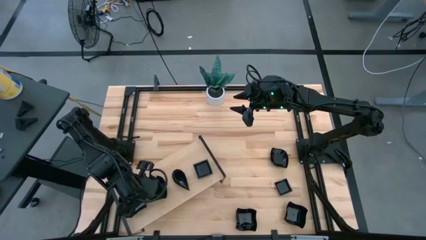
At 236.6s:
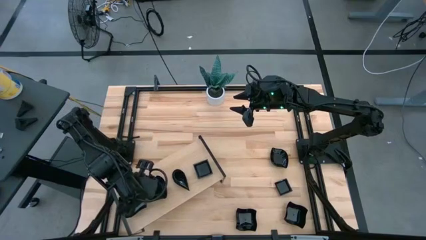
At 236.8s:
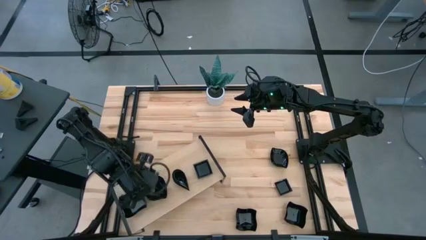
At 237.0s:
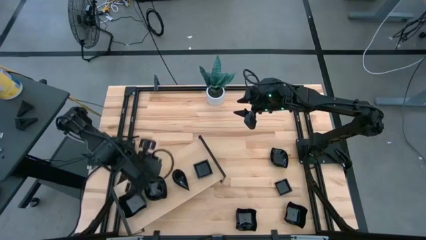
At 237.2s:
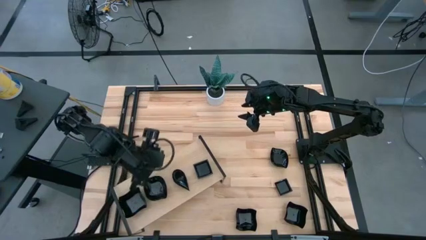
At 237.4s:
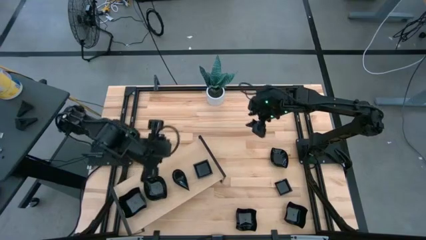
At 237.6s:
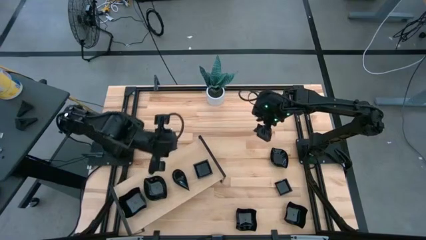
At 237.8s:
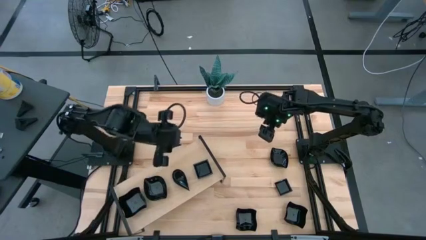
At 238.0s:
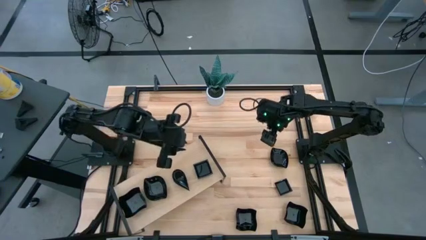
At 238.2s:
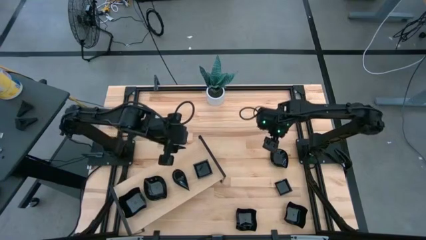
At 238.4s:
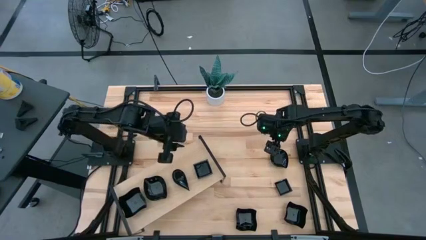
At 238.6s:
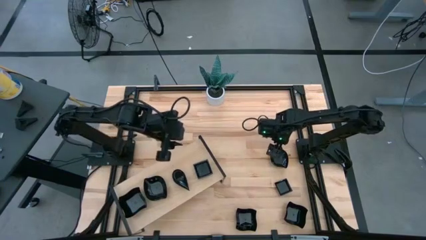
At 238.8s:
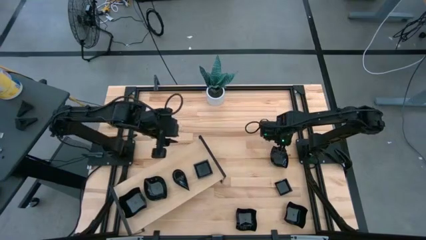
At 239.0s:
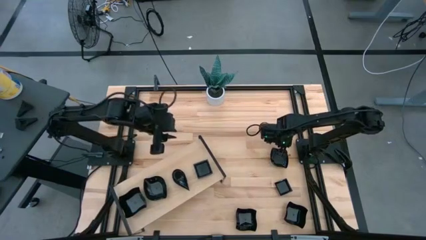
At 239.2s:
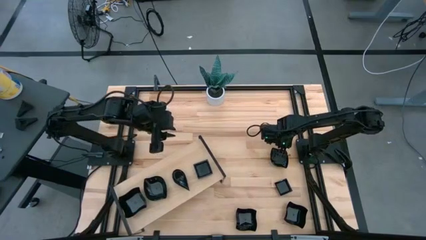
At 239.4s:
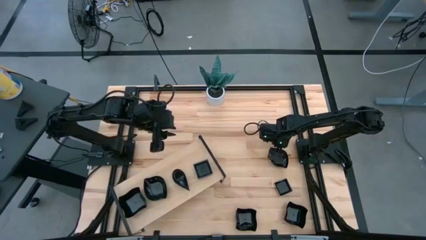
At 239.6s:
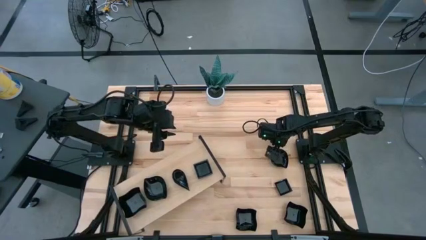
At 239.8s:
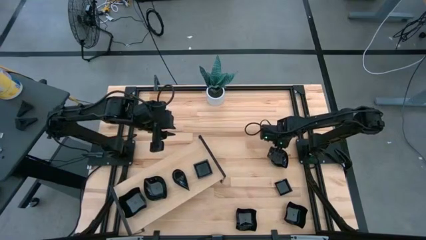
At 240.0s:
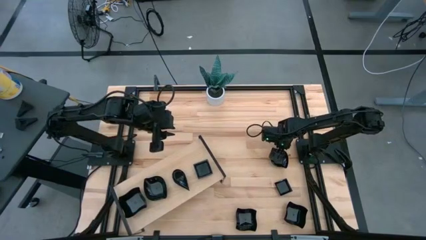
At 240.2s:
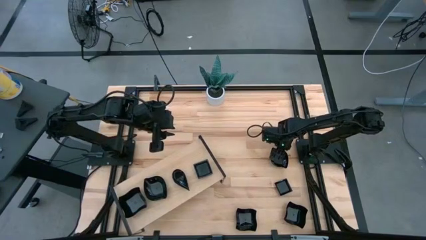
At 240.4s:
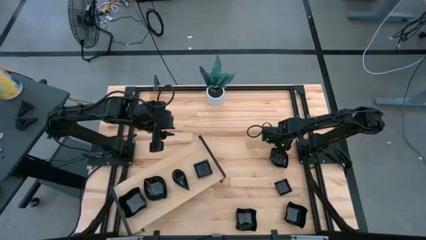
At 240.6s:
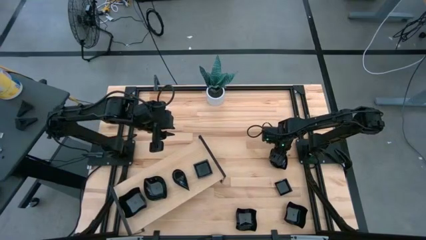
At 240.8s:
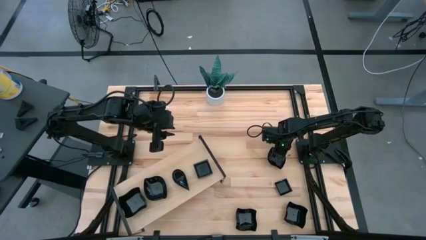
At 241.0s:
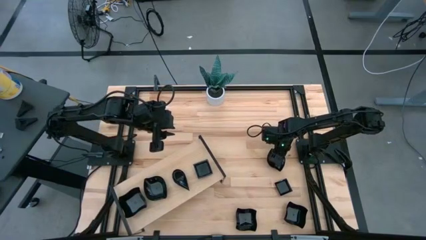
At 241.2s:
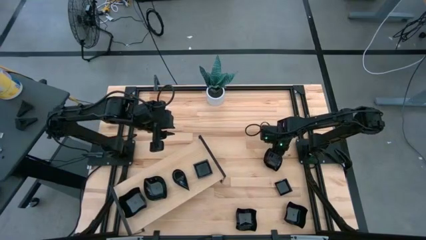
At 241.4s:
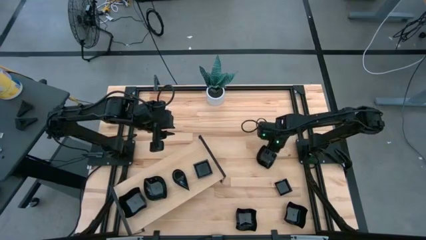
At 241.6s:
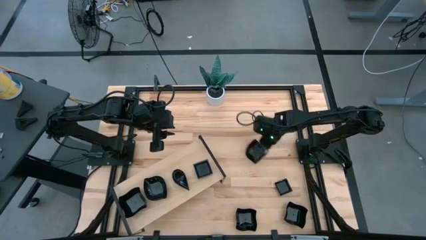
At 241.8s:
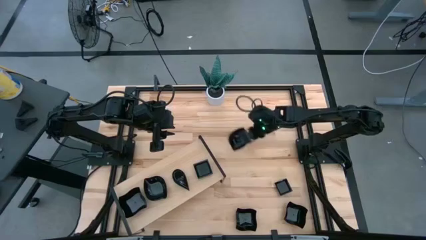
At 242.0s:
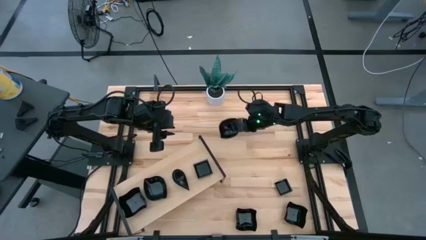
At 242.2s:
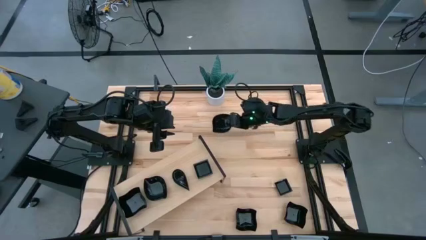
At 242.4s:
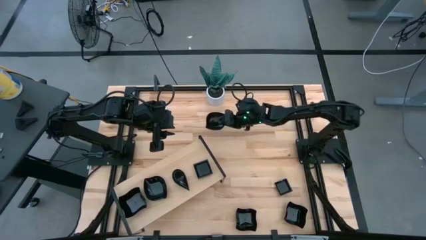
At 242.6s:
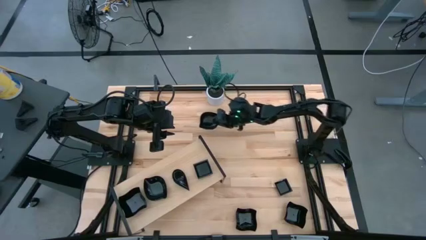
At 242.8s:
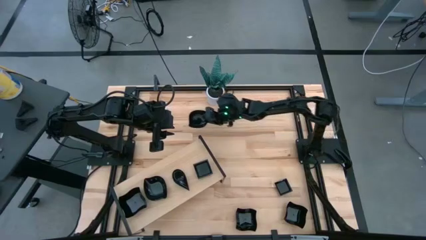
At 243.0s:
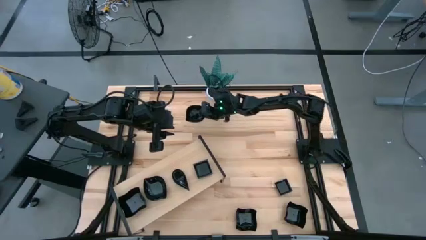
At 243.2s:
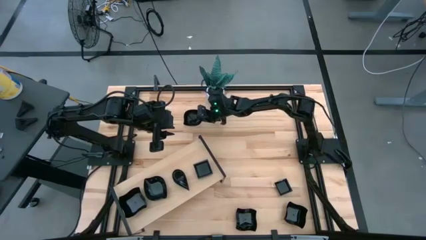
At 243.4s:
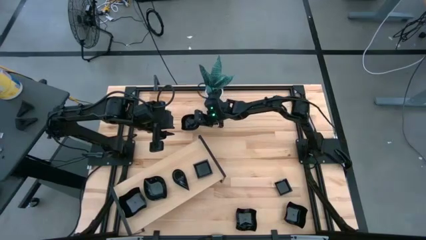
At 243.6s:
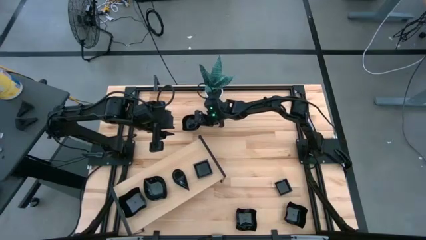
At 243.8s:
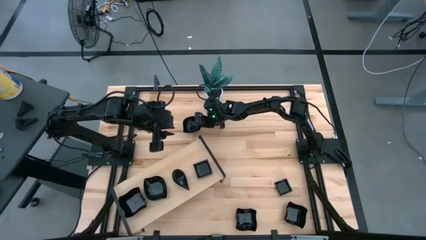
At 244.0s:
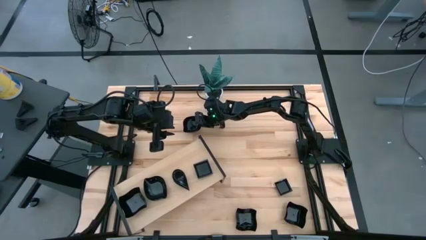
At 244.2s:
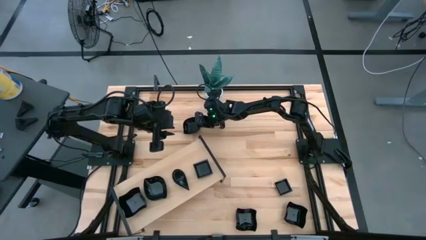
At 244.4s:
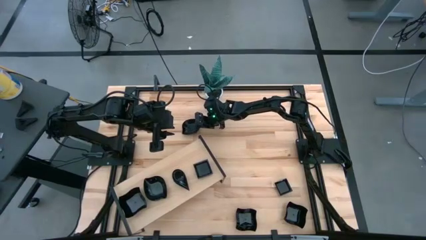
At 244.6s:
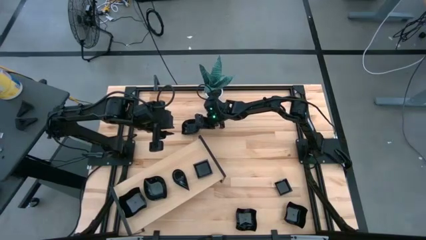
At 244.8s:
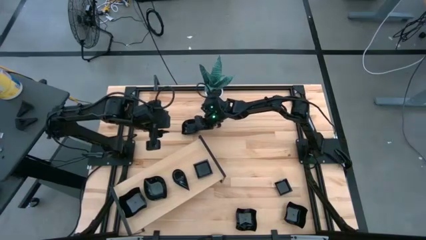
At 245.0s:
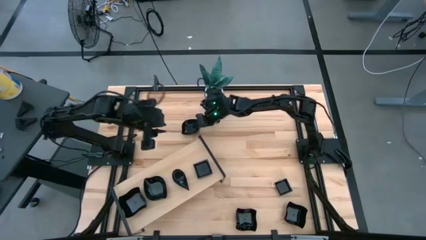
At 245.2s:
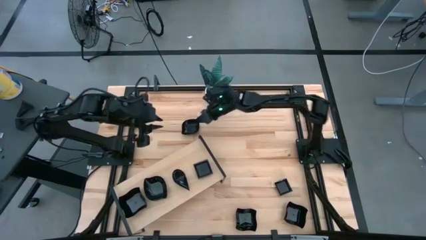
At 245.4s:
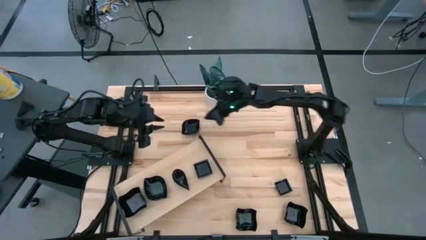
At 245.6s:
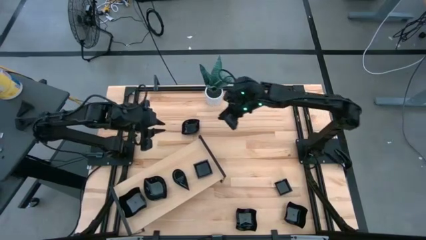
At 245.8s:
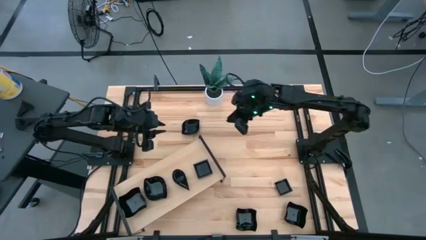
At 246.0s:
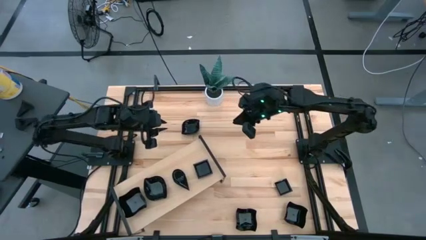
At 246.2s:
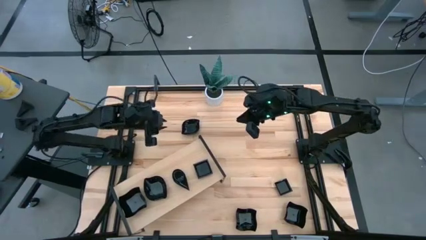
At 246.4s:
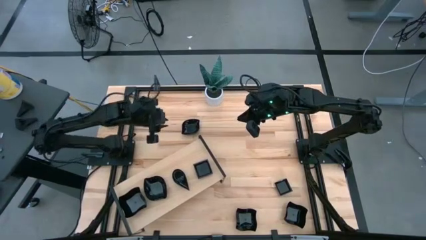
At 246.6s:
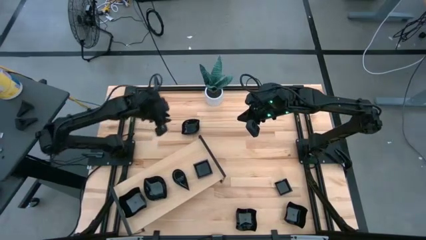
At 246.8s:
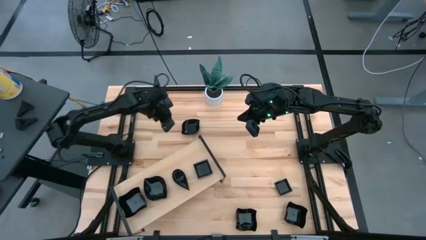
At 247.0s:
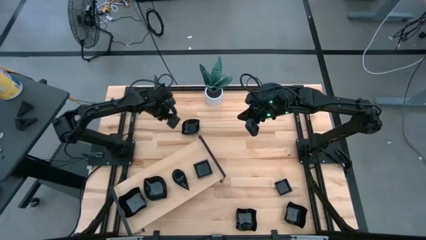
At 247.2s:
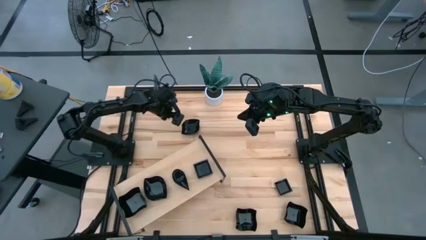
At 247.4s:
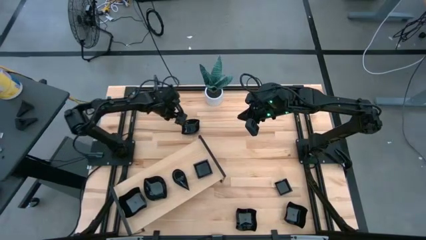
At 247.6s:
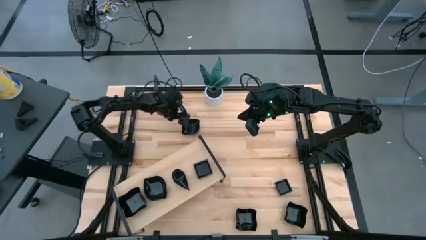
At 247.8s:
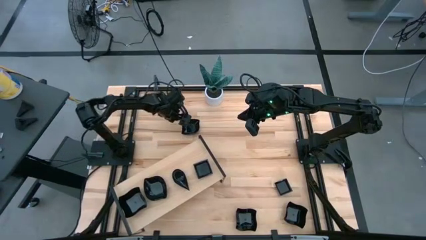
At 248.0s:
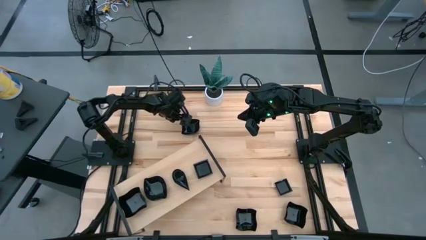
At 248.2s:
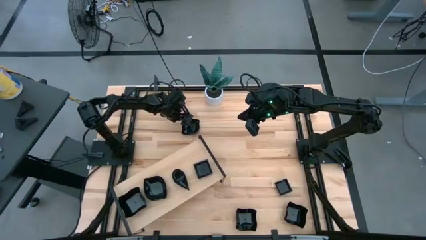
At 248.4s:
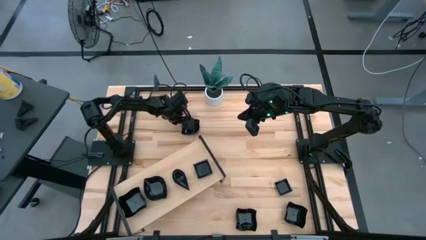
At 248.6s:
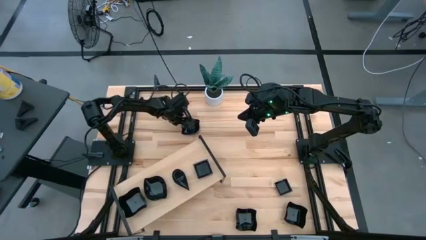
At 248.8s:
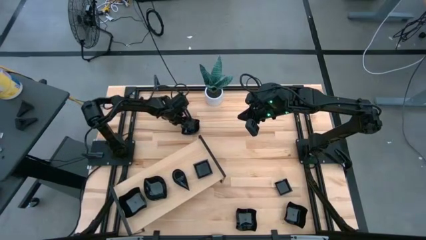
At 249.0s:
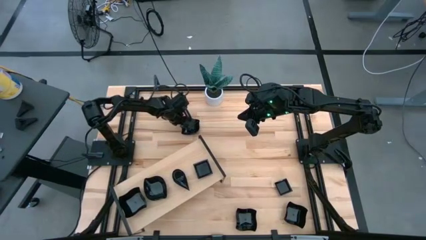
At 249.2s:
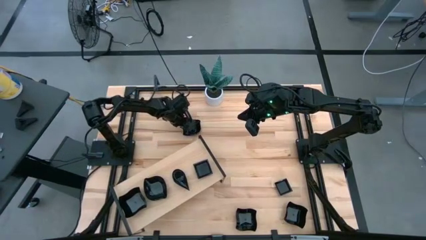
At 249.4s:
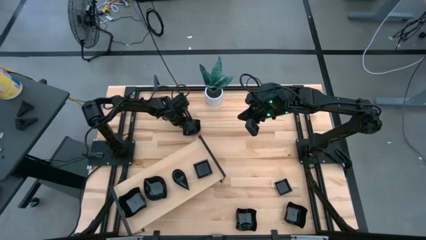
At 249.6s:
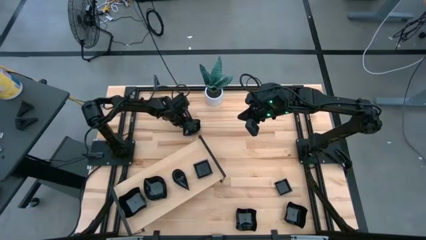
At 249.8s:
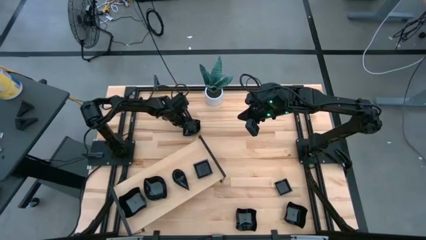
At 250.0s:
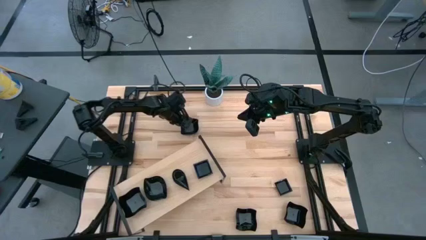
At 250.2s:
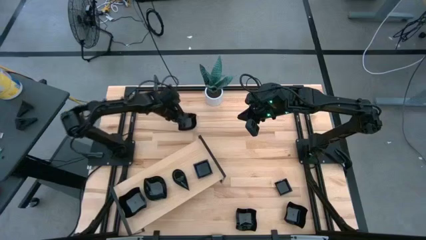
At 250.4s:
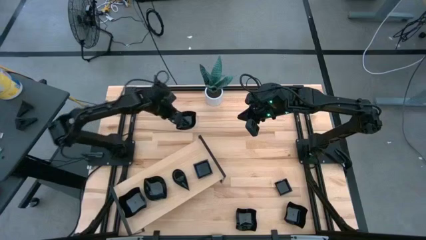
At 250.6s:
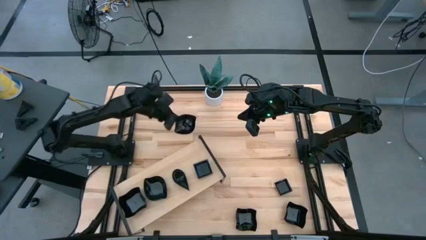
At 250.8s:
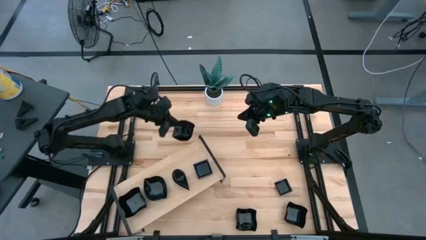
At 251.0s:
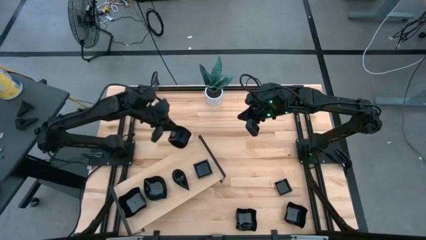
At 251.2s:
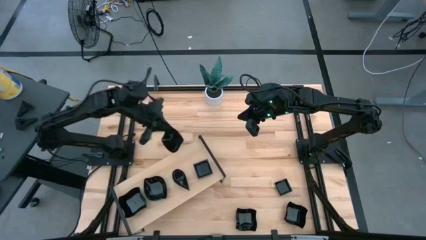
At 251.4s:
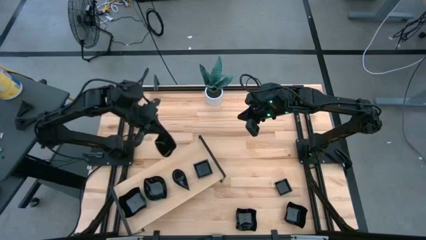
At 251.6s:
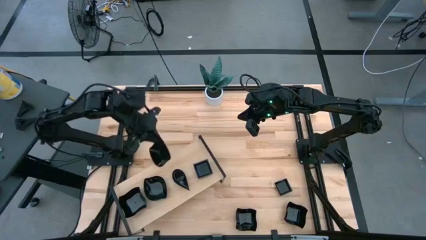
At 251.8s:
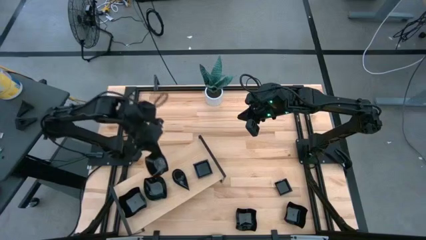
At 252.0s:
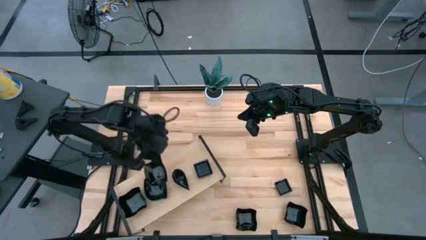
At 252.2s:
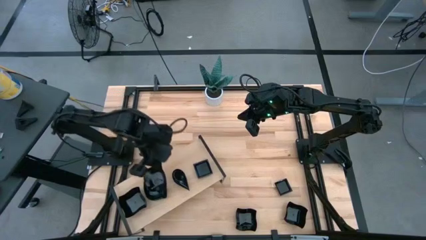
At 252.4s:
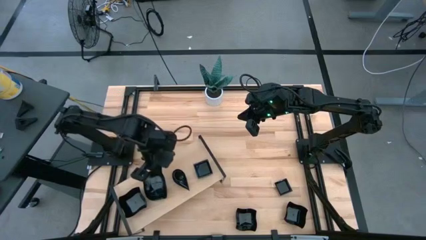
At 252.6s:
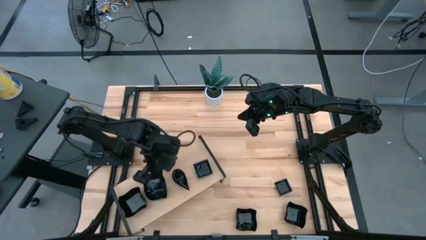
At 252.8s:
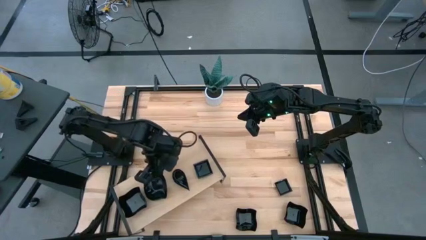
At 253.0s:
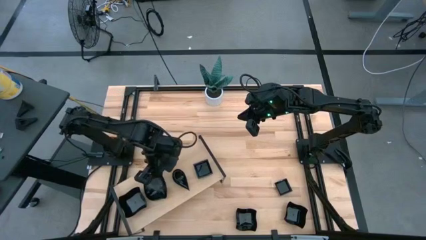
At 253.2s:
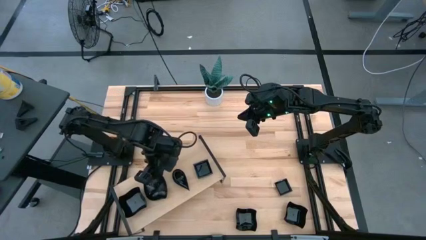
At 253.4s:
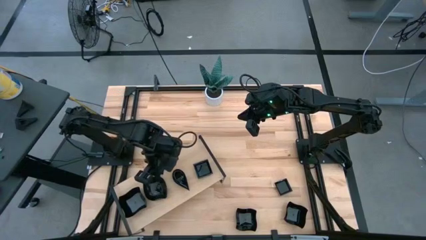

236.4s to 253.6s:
Task: Pick & Place Mini shaped plates
Stack the black leaf shaped on top of the black leaf shaped on the shelf
